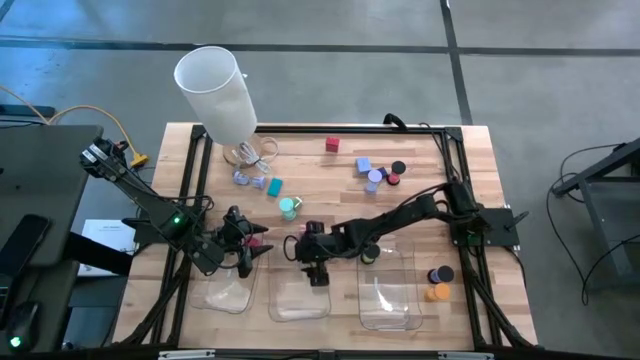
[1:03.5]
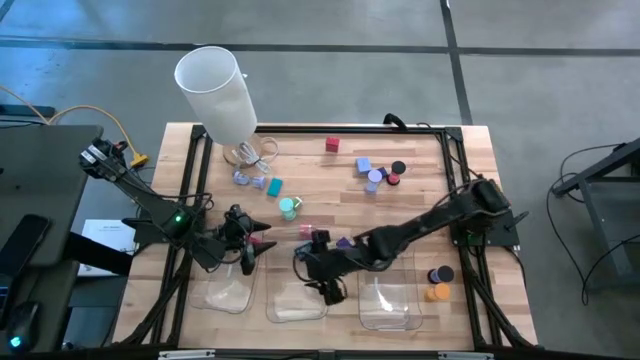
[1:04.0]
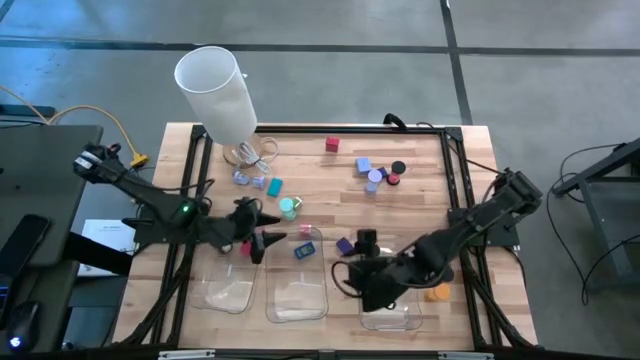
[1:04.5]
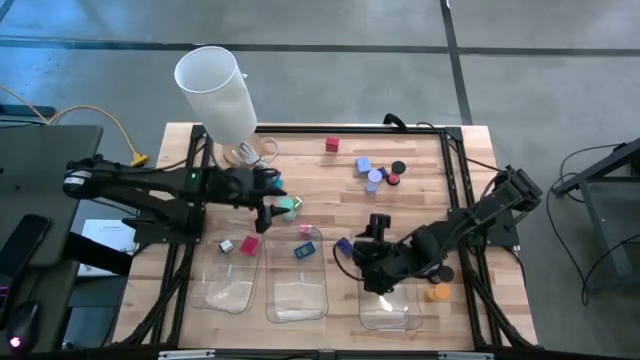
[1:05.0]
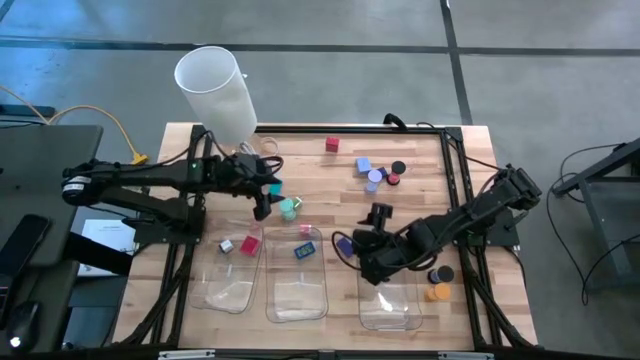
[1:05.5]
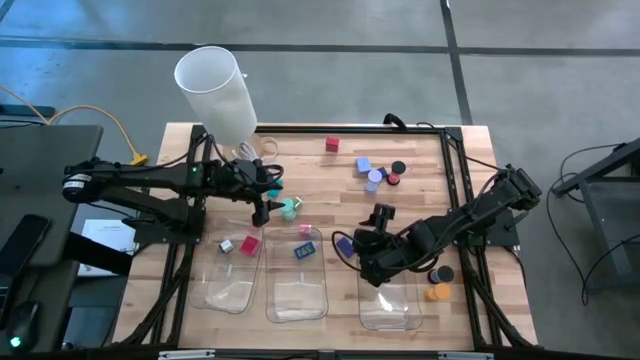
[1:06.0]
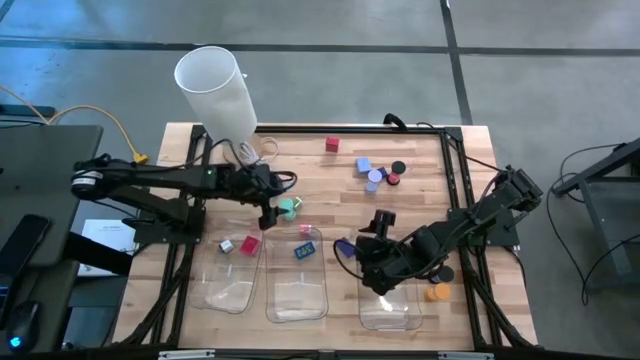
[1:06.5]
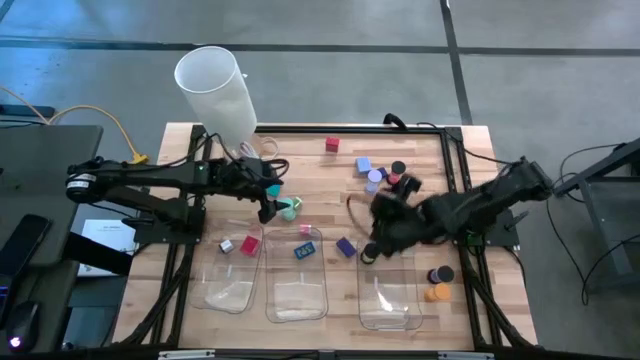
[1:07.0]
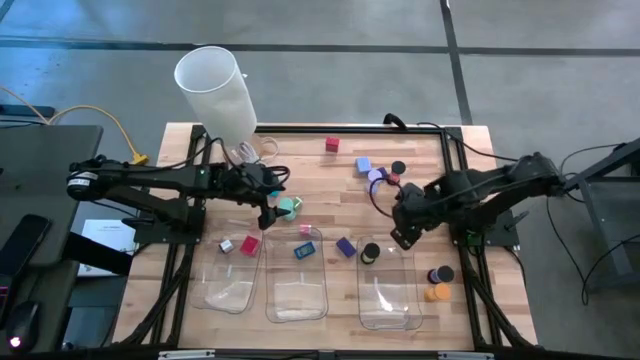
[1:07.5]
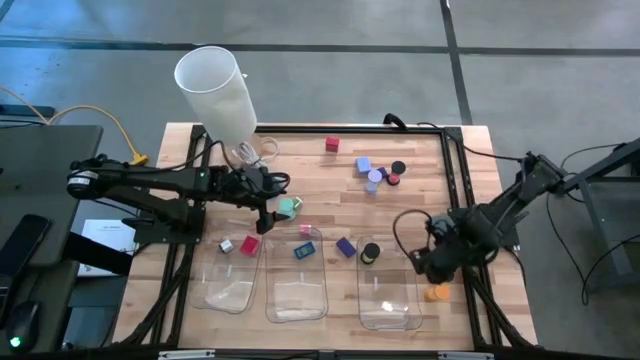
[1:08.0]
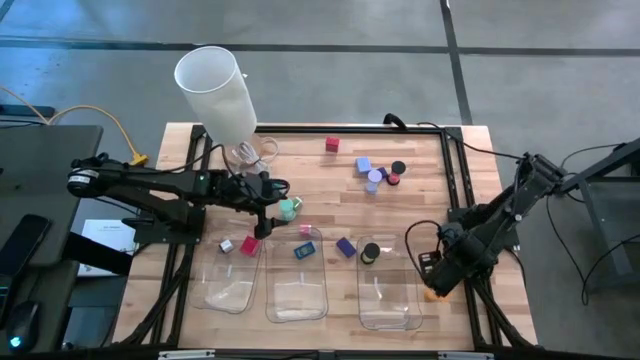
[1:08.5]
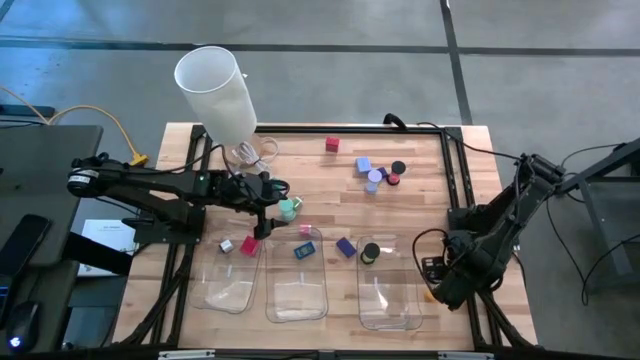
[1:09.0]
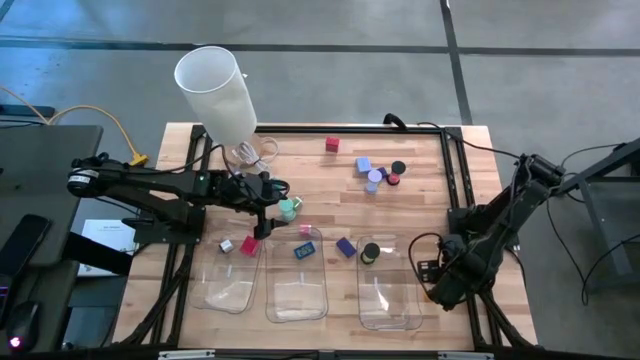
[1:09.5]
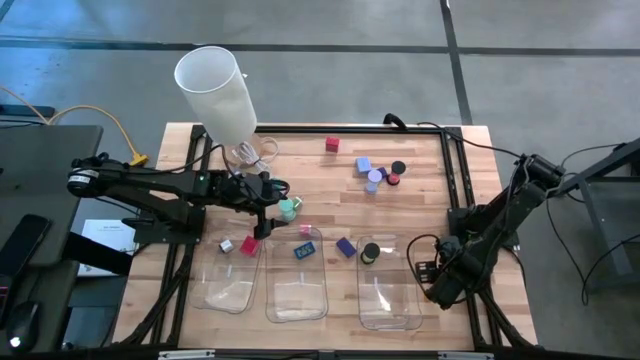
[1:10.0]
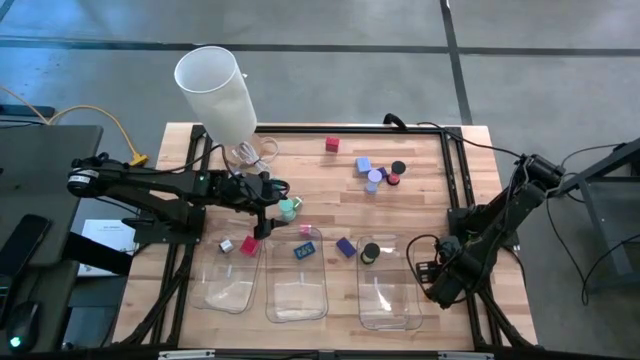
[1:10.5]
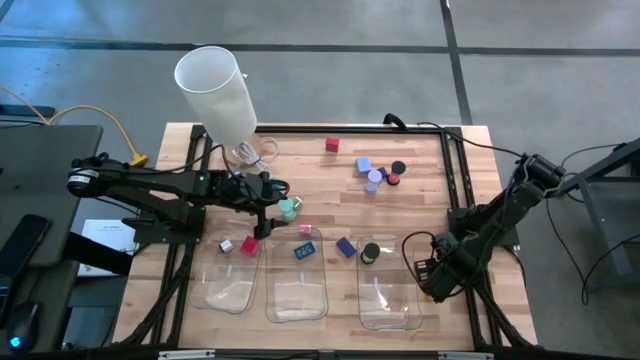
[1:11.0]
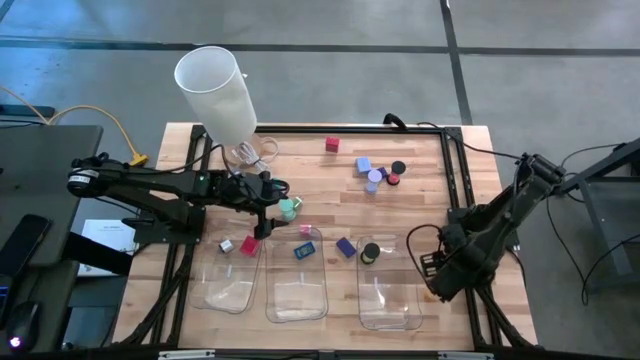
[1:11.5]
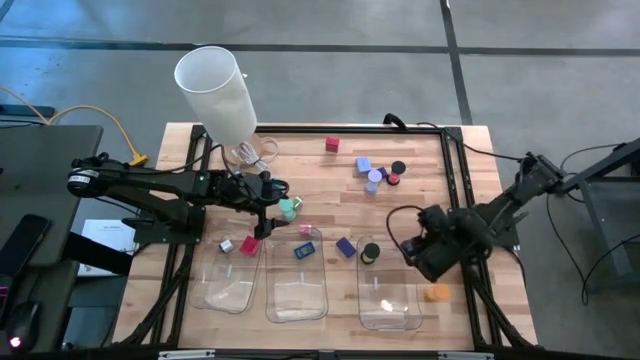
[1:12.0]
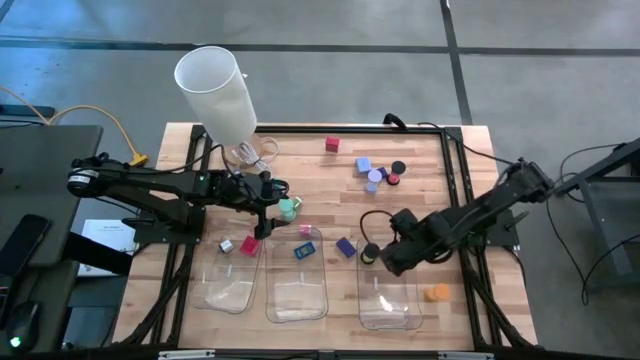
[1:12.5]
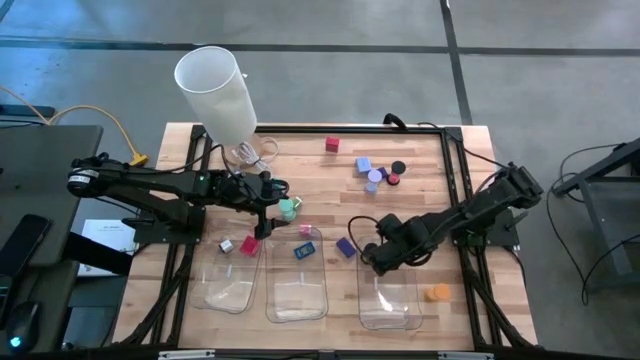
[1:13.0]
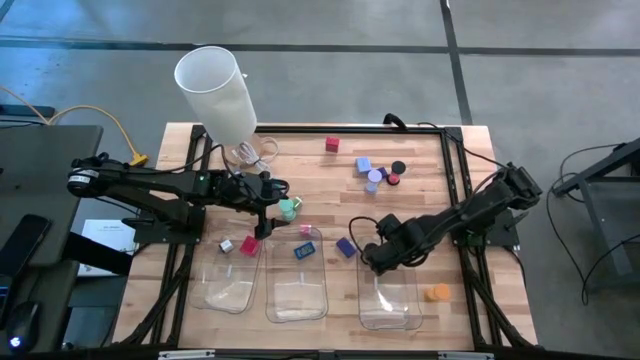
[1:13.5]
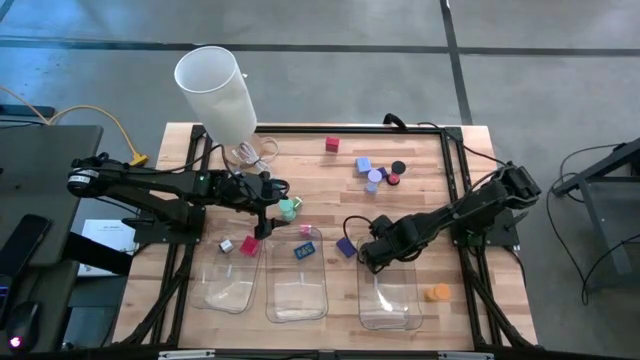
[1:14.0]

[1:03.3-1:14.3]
Task: Pick & Place Office items
Put the blue hourglass into the right bin

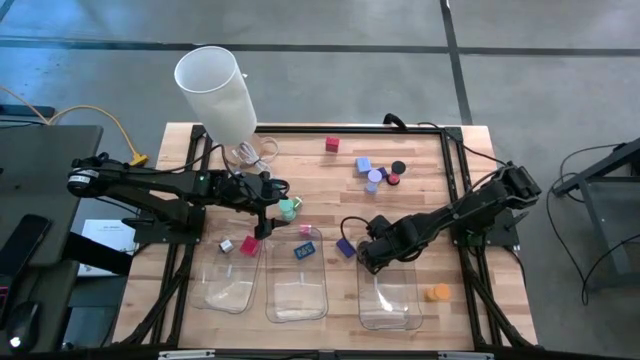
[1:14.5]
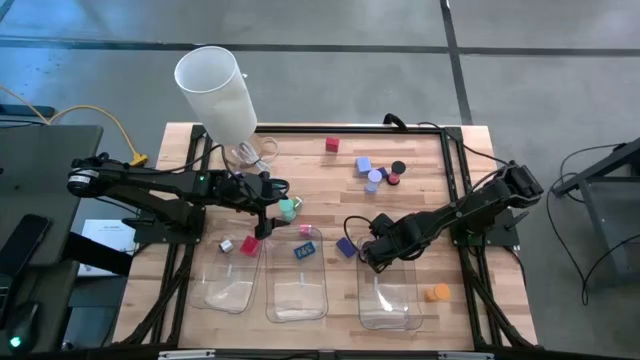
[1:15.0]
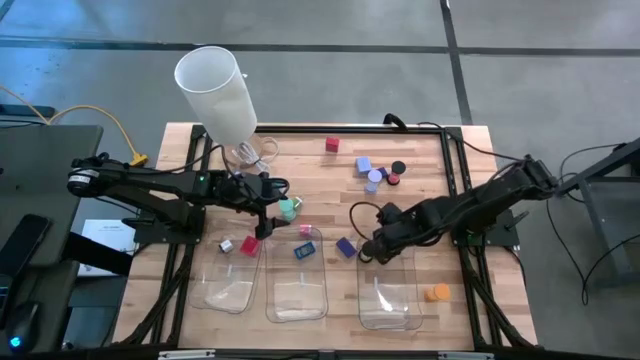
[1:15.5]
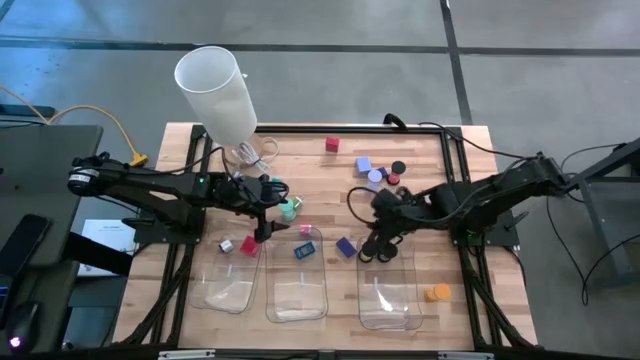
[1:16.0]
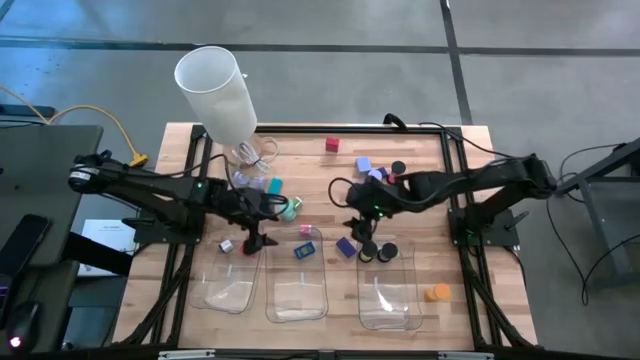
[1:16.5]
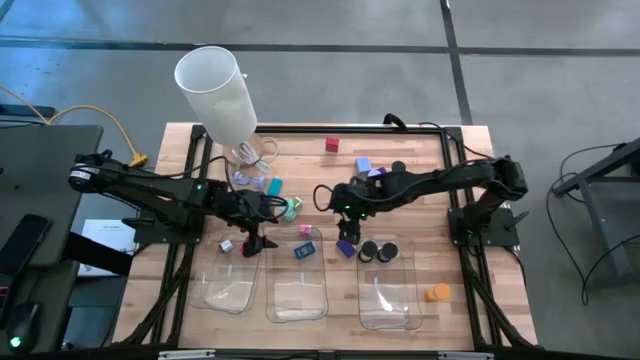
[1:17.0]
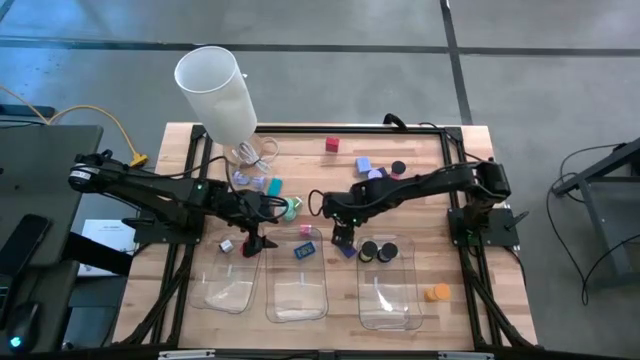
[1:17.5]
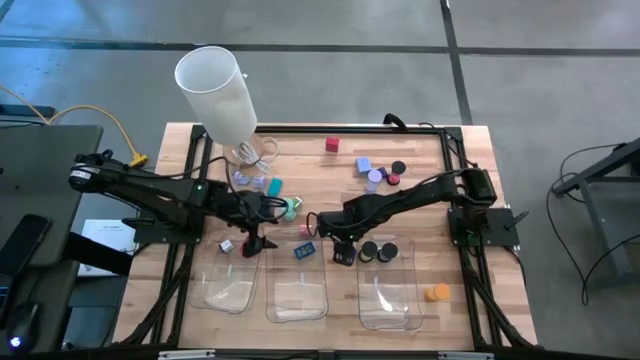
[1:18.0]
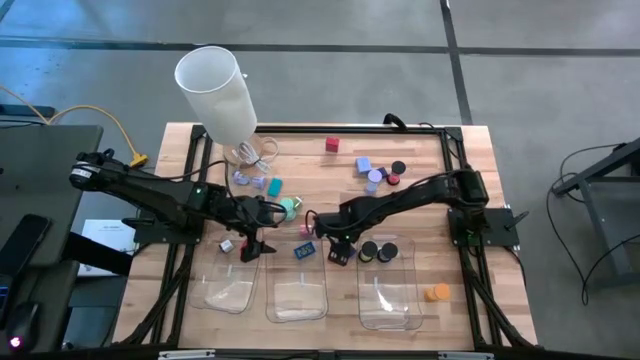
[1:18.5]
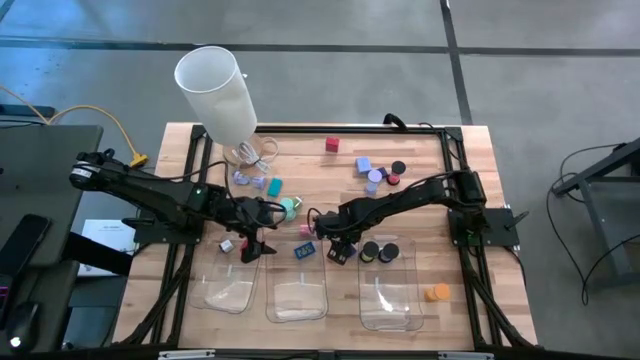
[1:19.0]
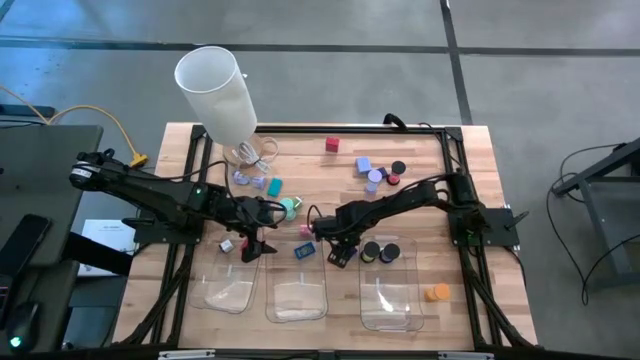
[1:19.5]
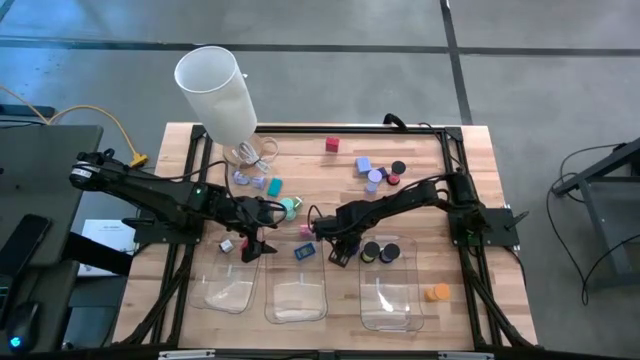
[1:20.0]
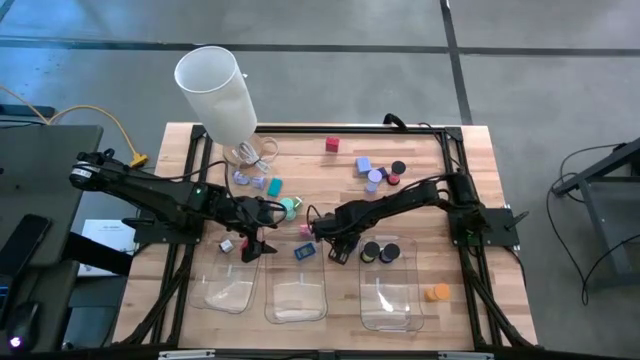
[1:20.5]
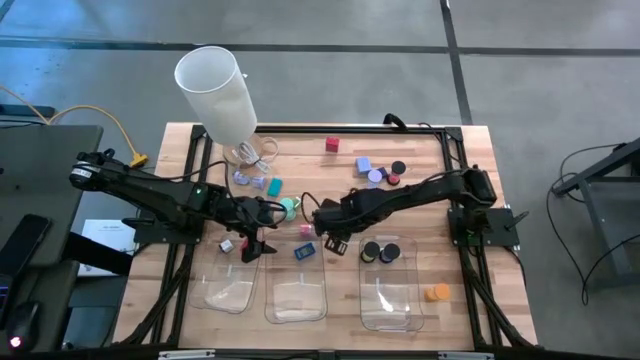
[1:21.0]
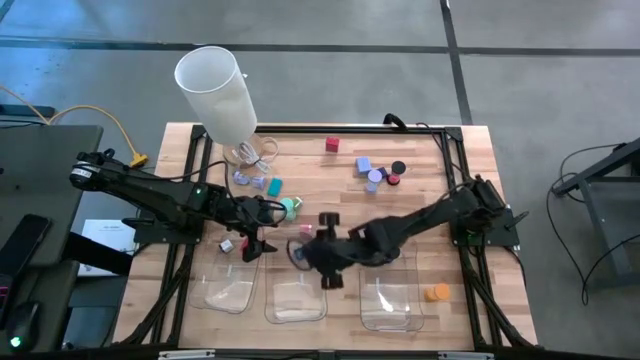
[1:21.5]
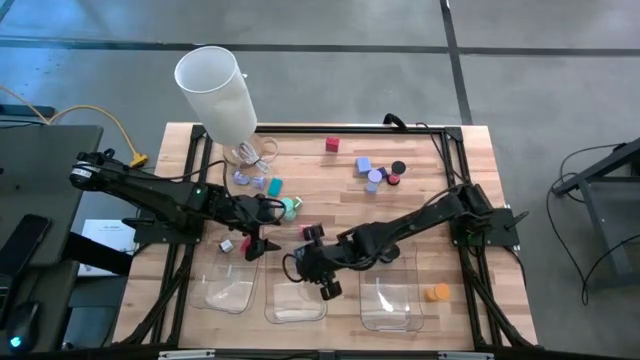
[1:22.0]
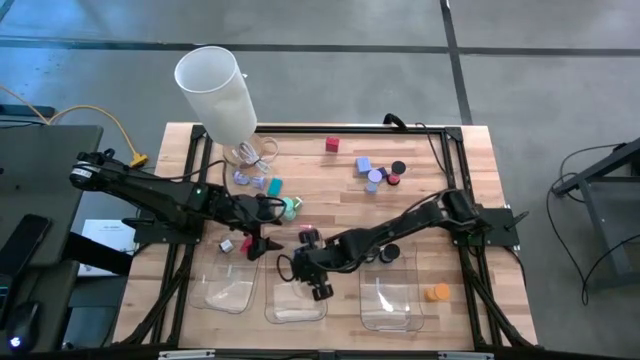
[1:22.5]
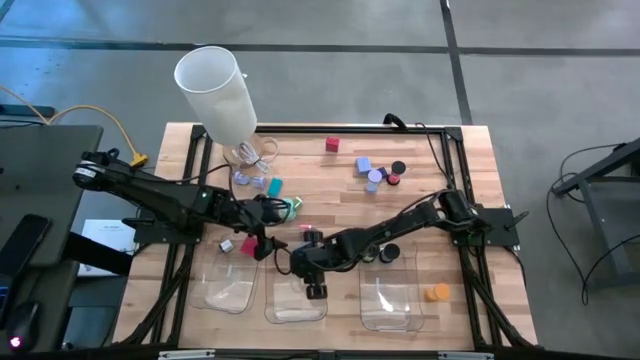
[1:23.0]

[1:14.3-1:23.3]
Put the middle blue clock into the middle bin

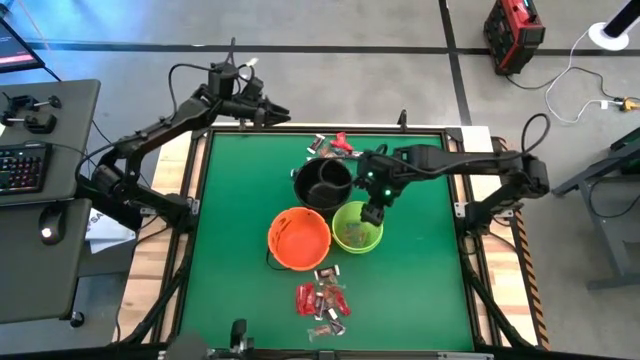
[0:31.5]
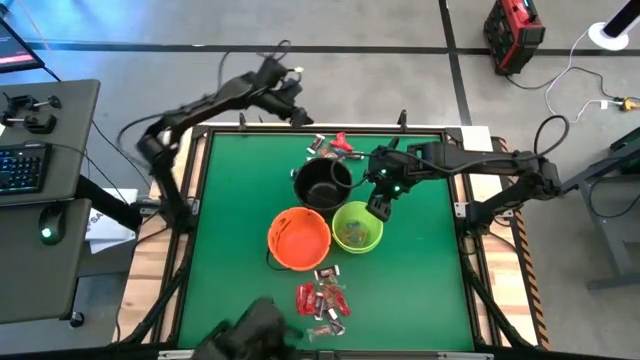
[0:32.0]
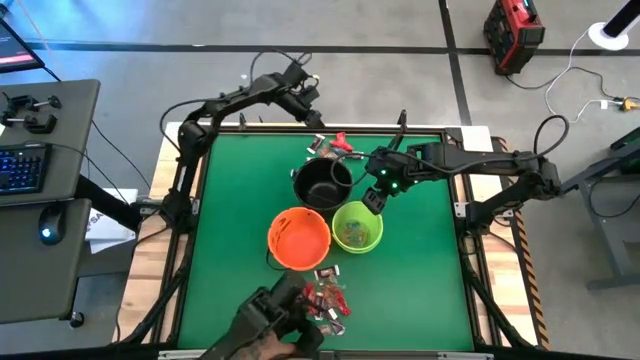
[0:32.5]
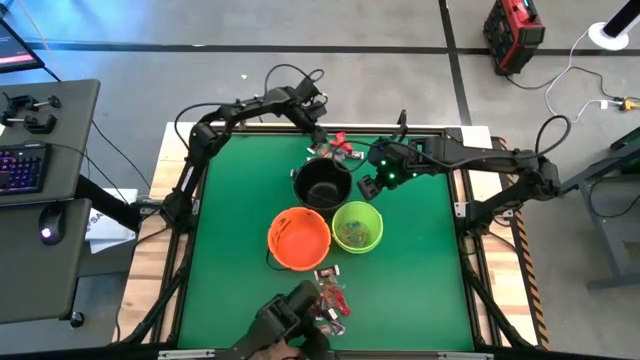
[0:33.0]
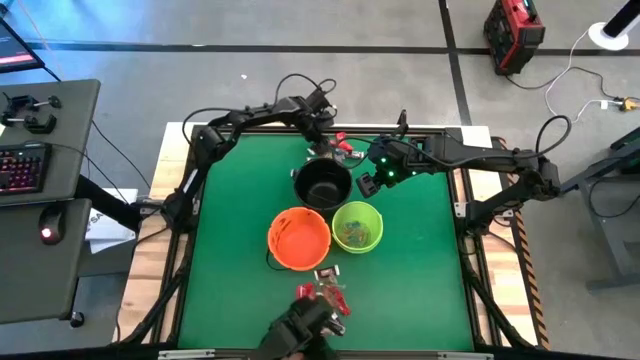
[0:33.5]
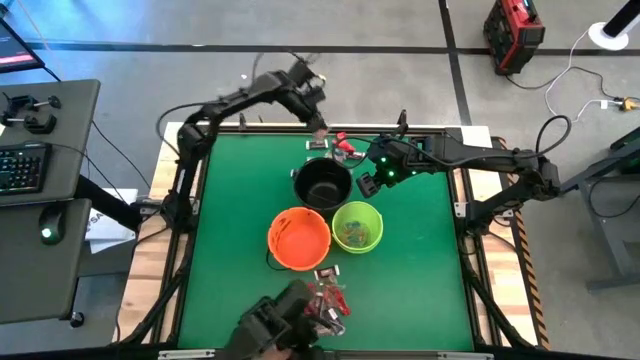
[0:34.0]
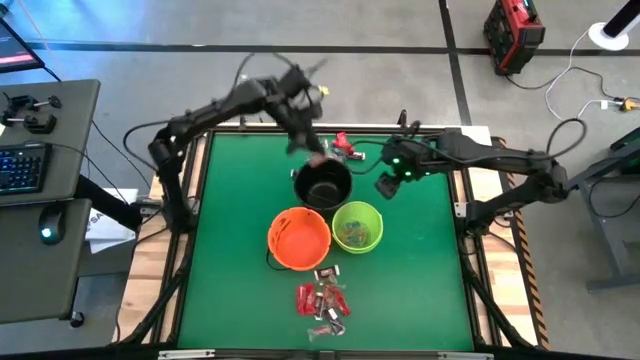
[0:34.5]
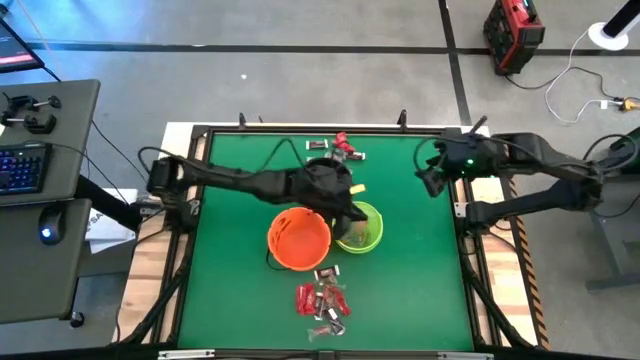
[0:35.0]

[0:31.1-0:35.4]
Task: Sort candy by brand, put in halloween buckets
Put the orange gummy into the green bucket
